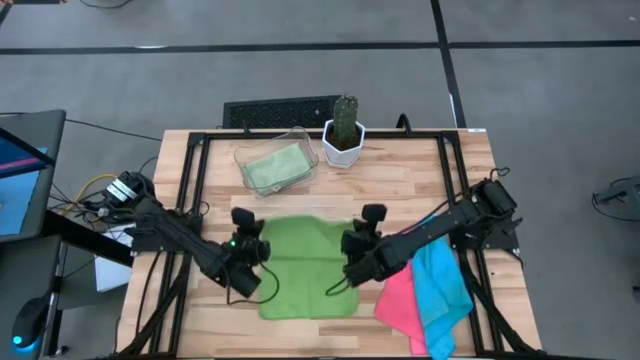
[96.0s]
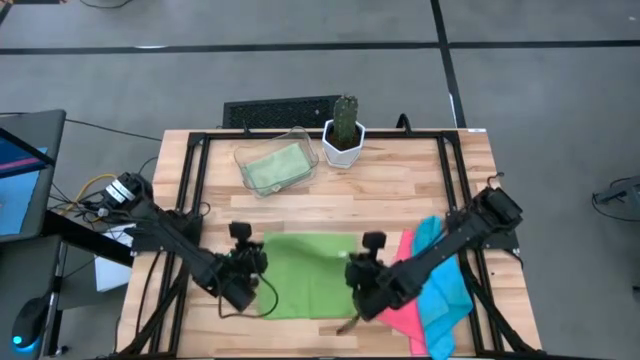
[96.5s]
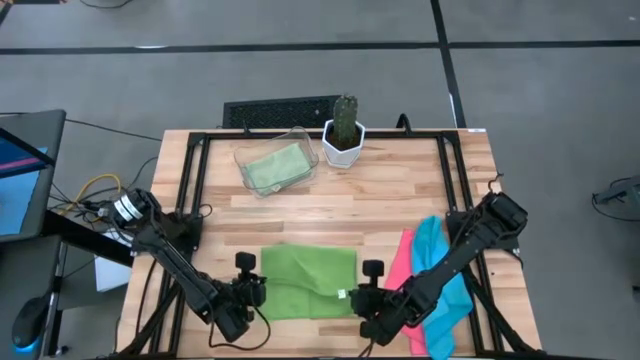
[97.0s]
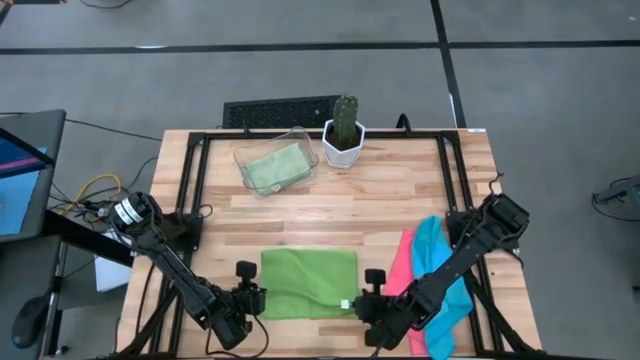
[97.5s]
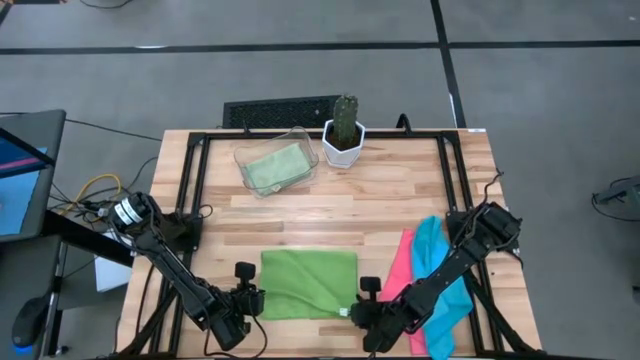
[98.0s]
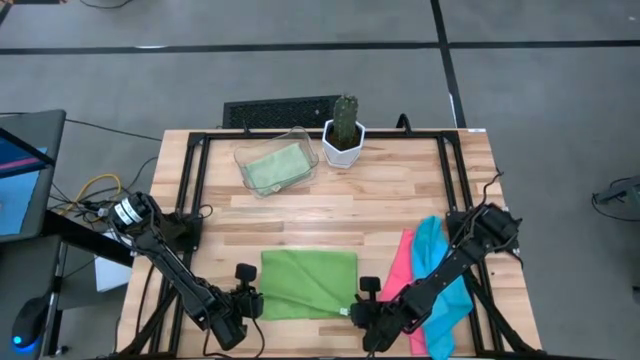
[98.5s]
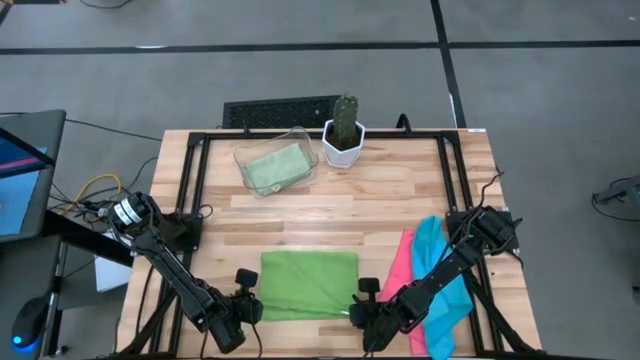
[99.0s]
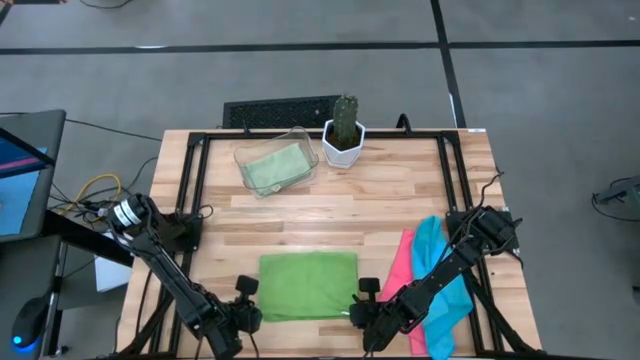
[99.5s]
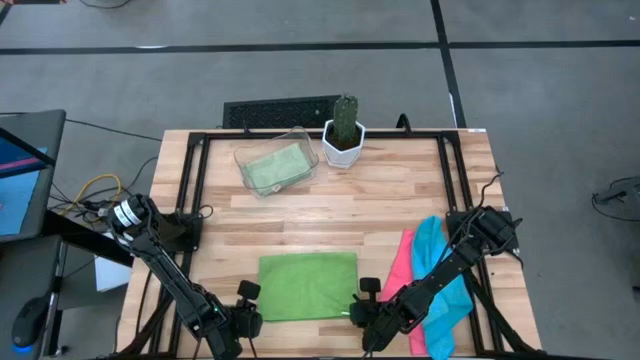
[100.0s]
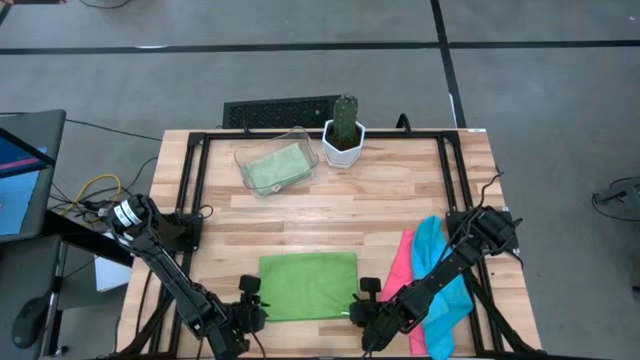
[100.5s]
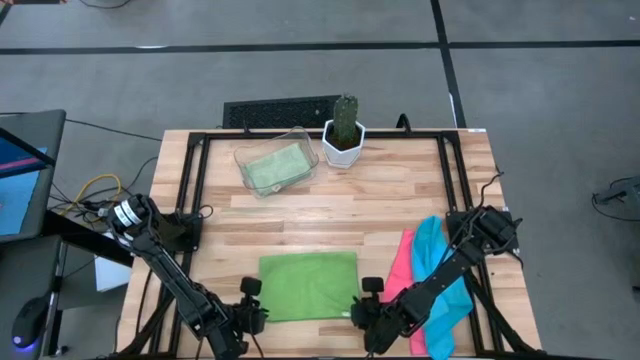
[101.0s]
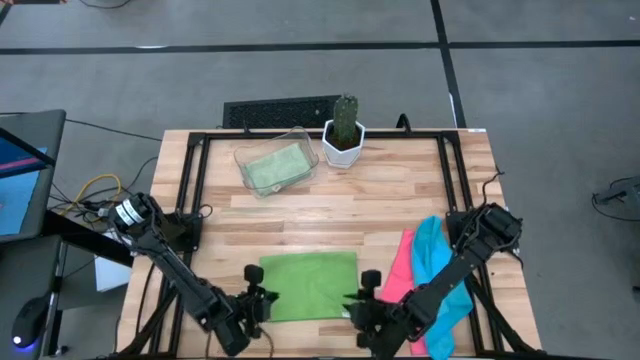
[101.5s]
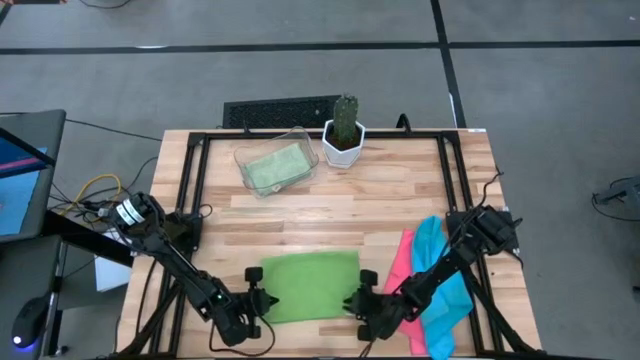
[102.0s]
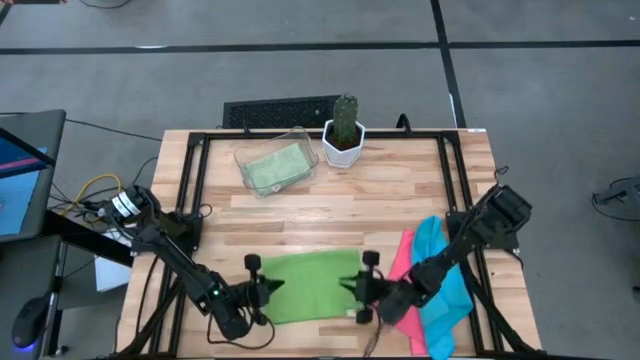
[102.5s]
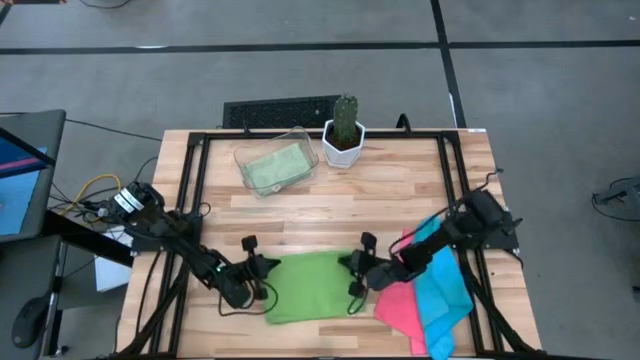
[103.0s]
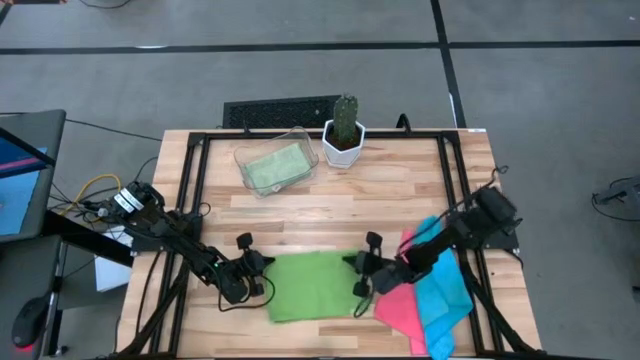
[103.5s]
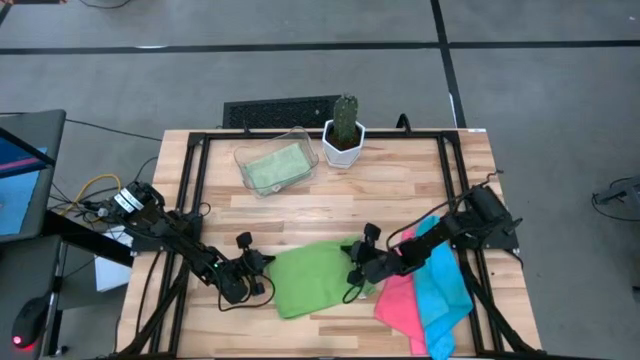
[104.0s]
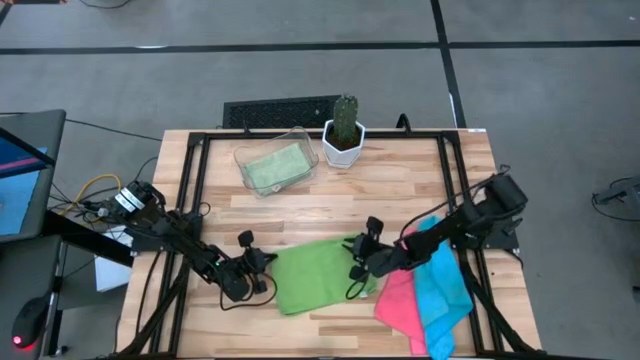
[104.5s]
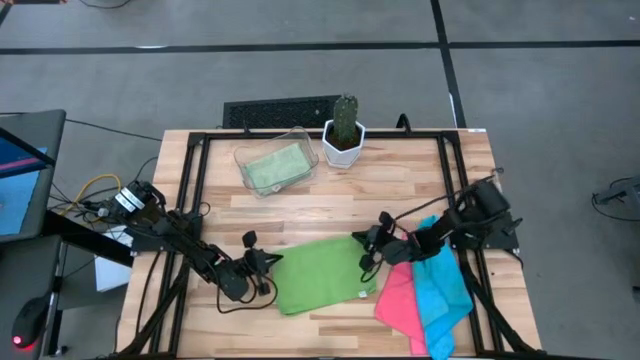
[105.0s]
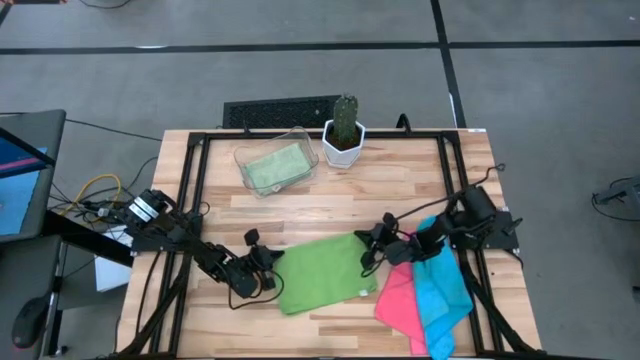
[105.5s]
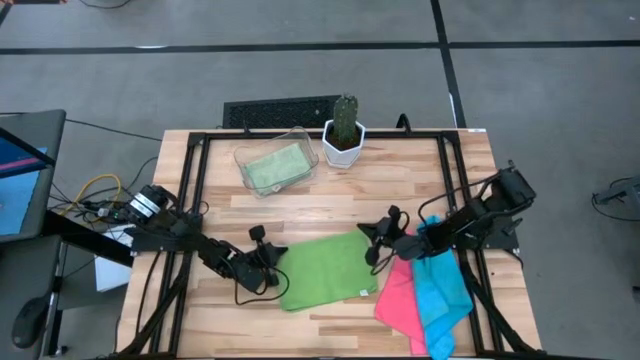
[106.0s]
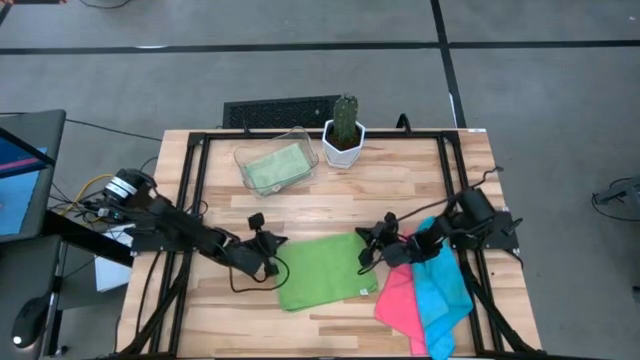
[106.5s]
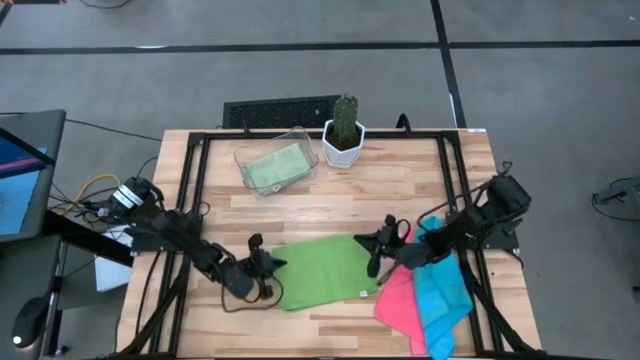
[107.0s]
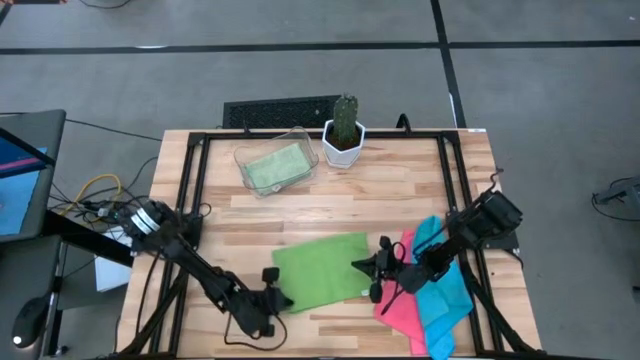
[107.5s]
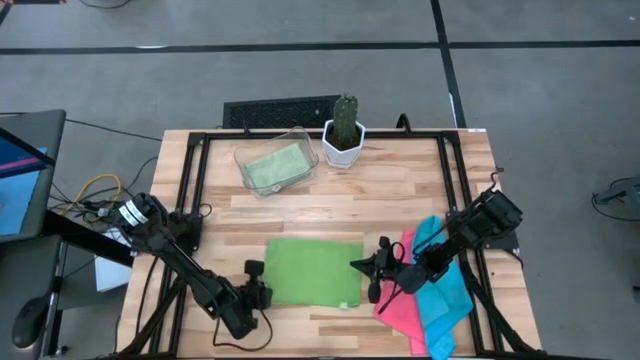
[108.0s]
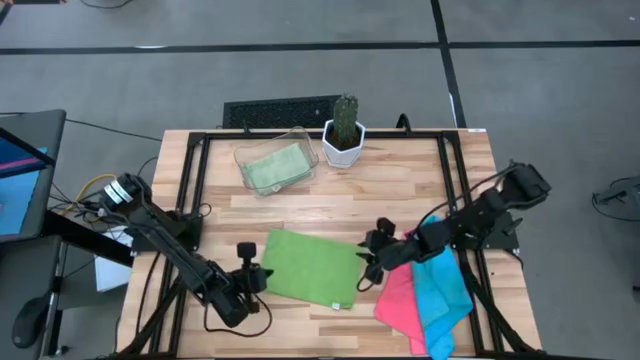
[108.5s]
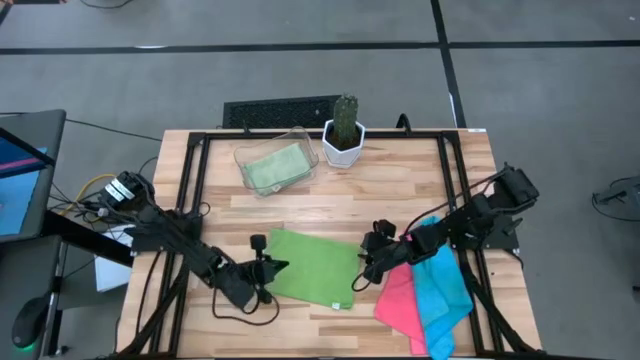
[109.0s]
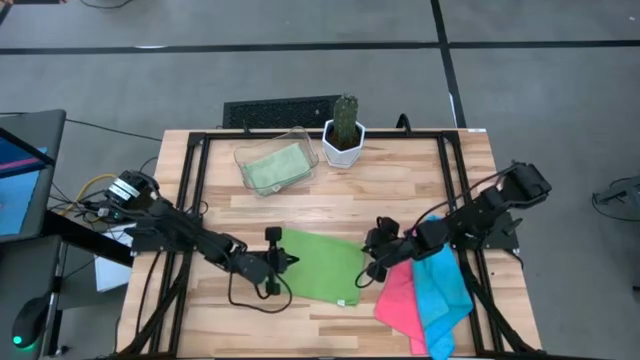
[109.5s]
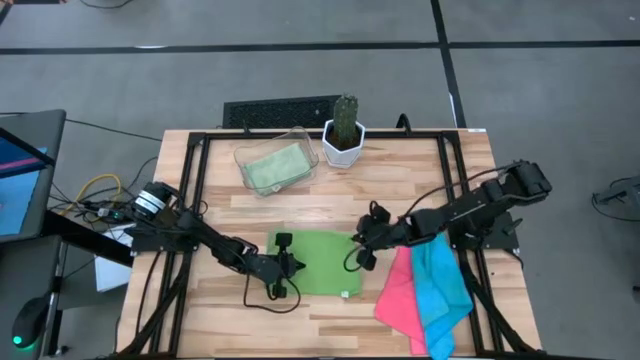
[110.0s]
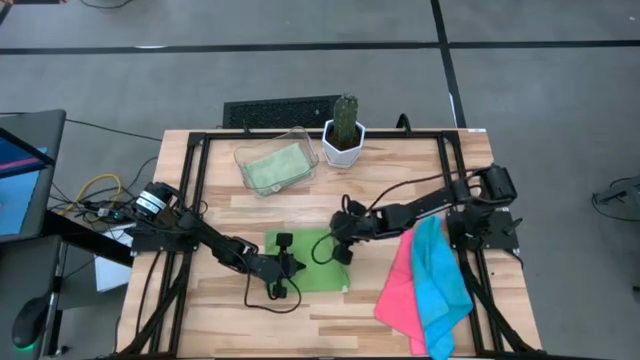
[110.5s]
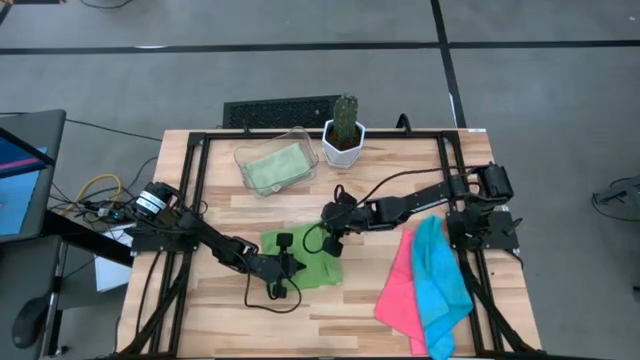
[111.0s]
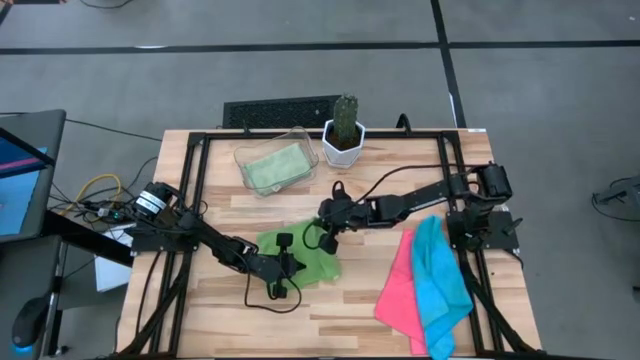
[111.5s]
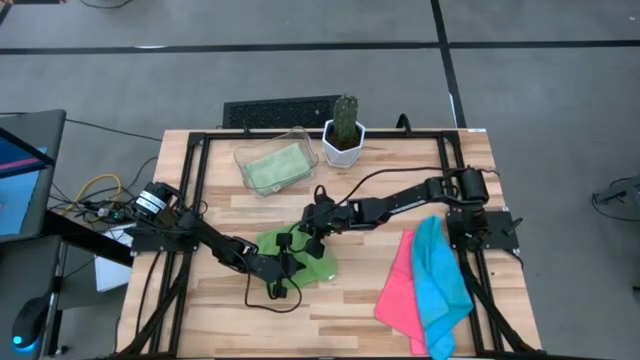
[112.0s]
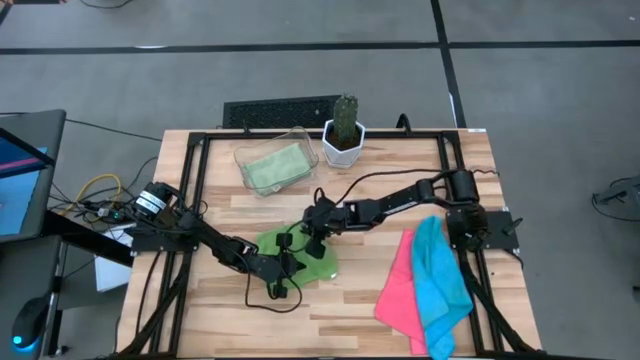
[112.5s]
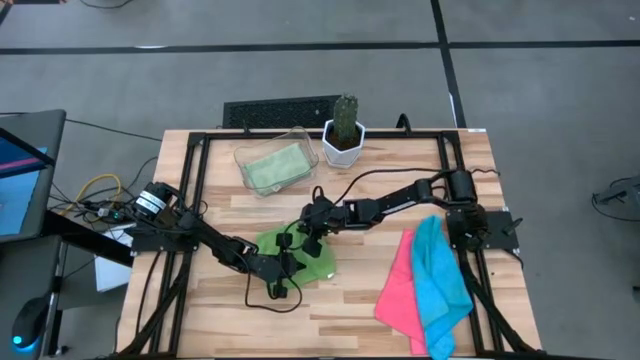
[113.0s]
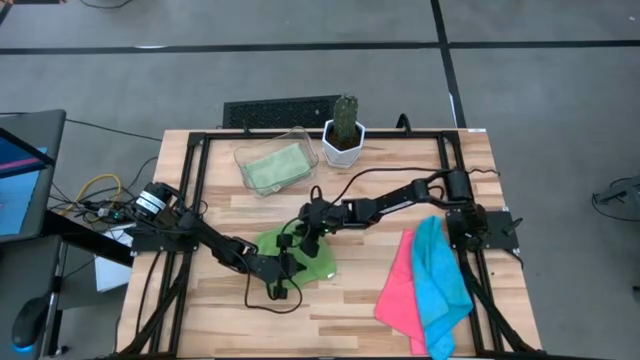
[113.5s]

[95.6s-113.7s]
Task: Fold microfiber towels
Fold the green microfiber towel

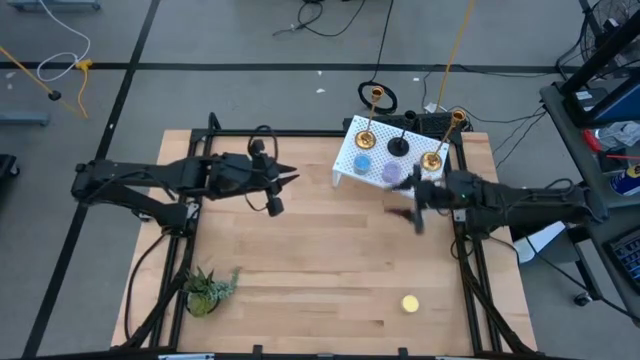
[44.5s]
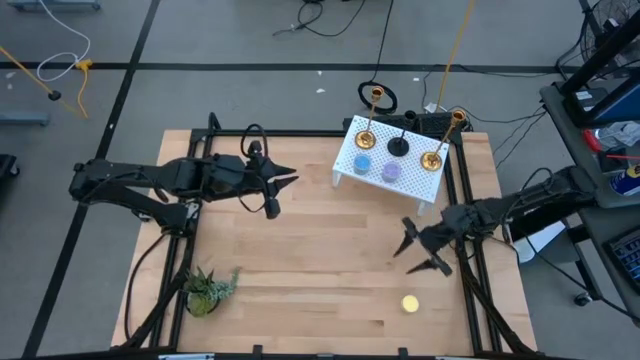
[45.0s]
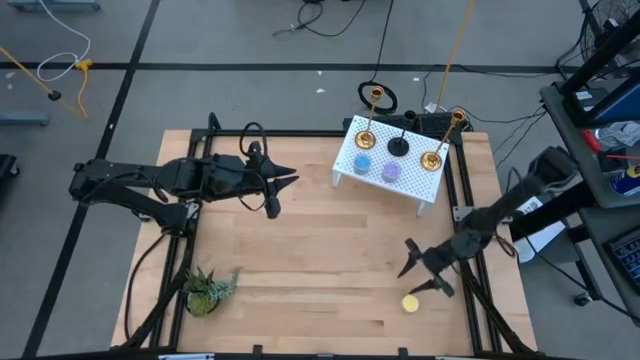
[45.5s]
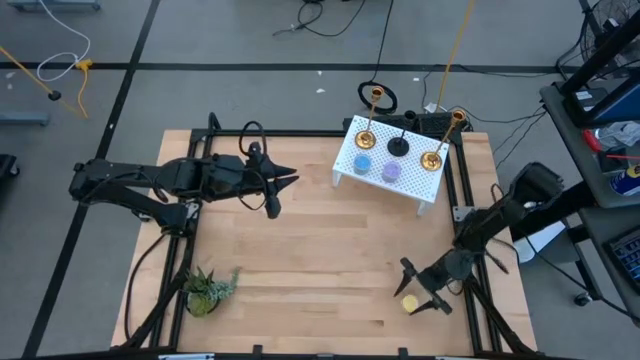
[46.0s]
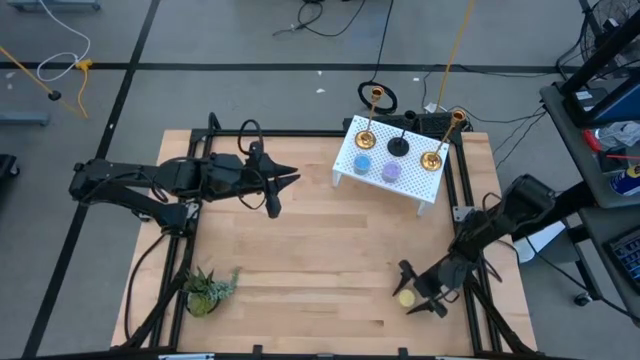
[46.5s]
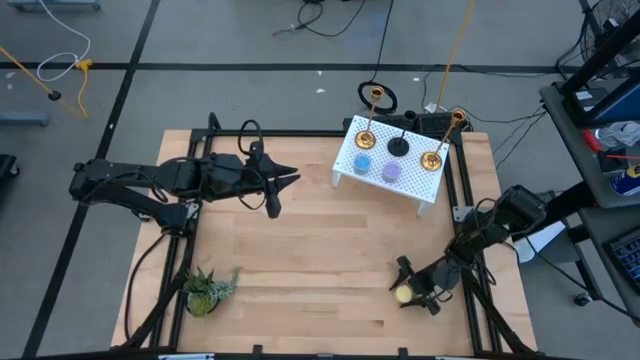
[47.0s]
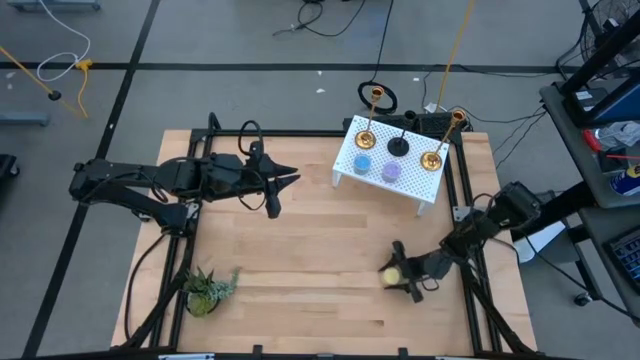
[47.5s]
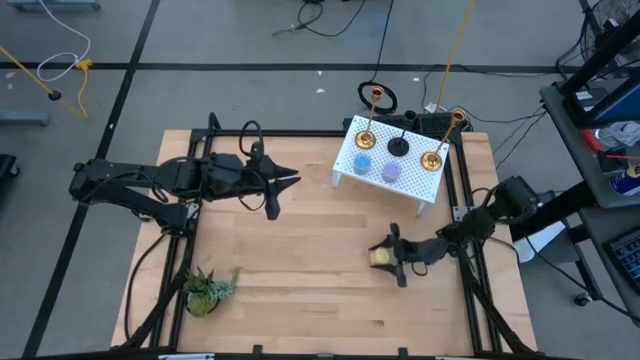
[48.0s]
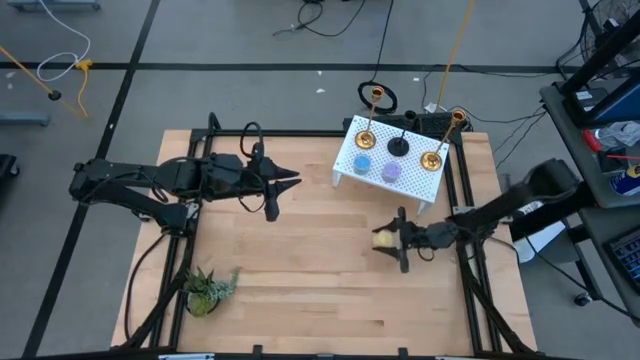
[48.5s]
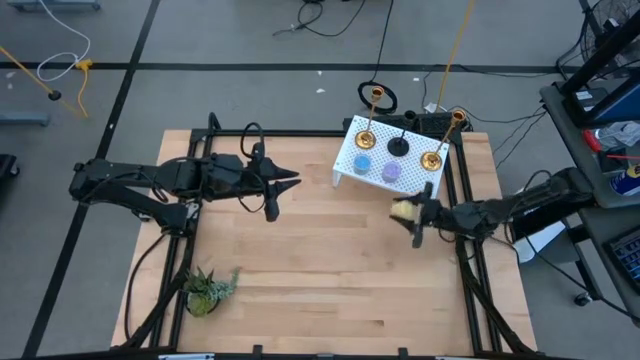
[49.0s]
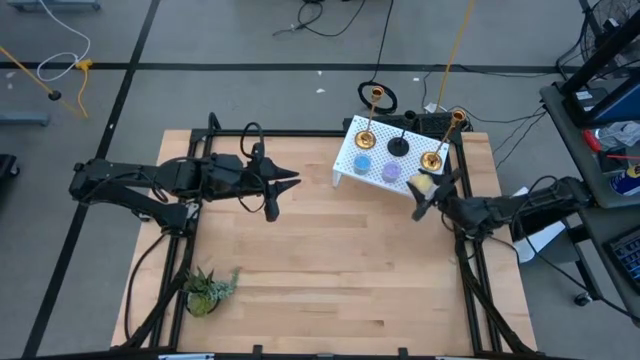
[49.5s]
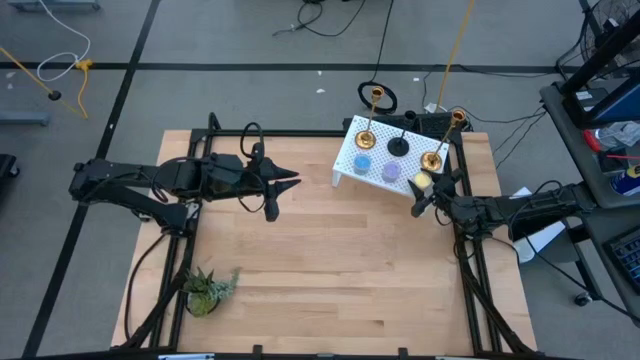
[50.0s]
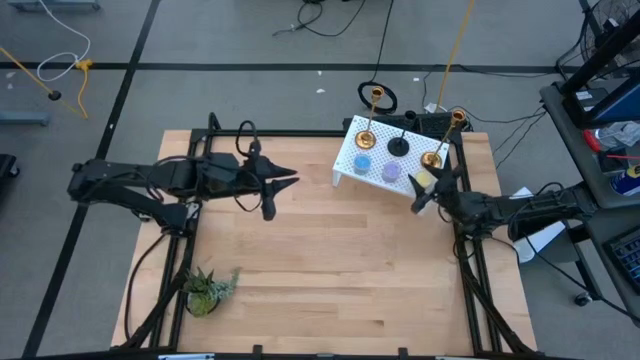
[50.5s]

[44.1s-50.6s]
Task: Pick & Place candle stick holders
Put the yellow scented candle on the shelf aligned with the purple and blue scented candles
